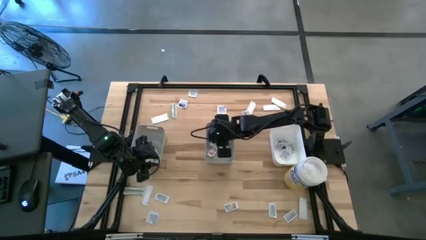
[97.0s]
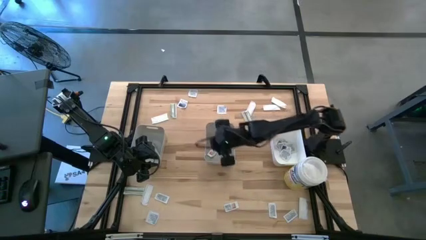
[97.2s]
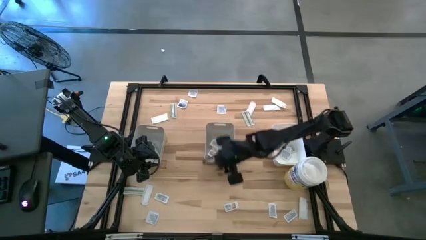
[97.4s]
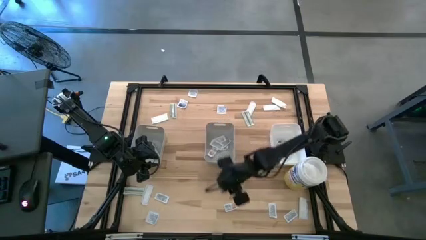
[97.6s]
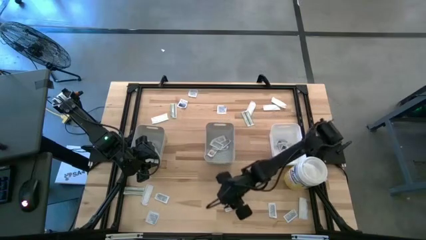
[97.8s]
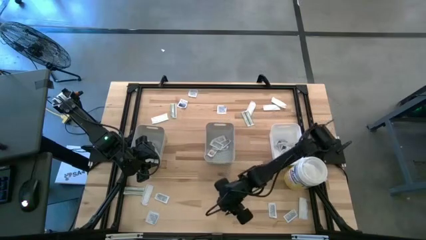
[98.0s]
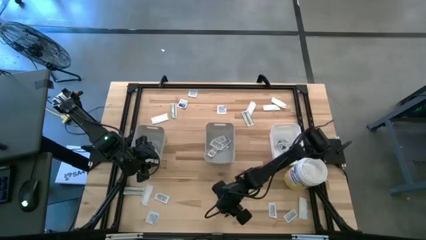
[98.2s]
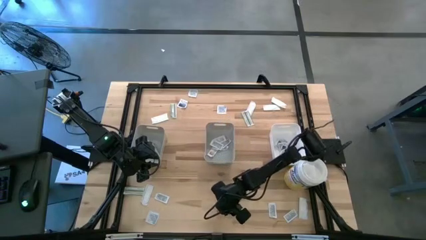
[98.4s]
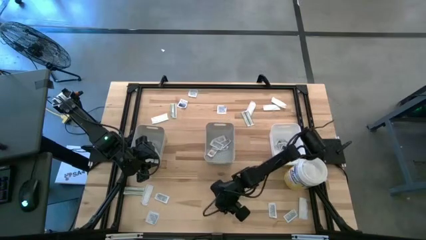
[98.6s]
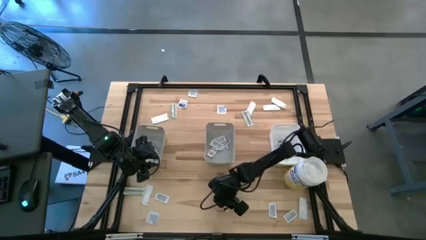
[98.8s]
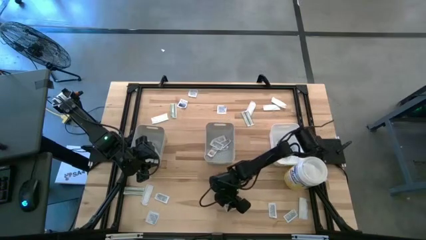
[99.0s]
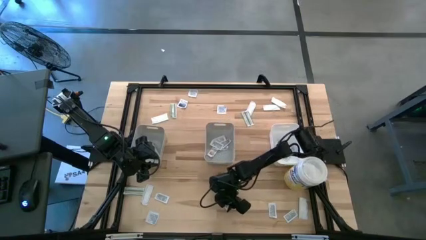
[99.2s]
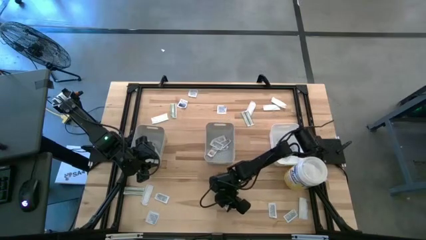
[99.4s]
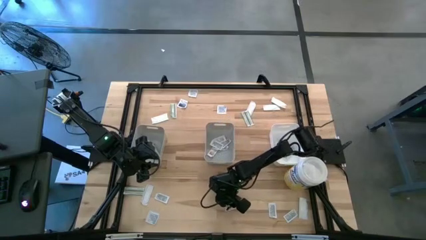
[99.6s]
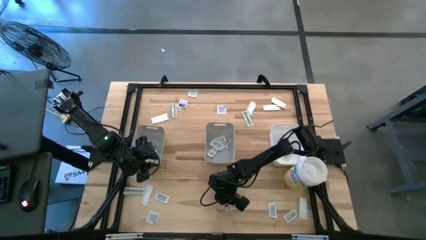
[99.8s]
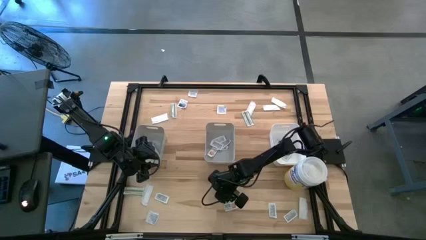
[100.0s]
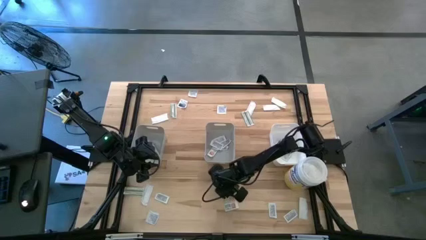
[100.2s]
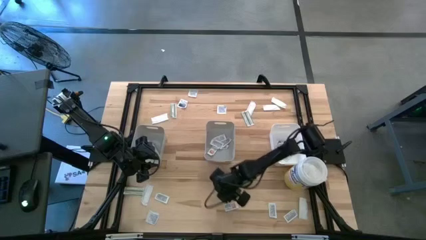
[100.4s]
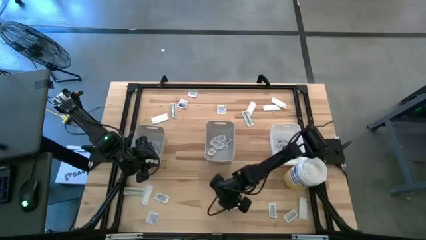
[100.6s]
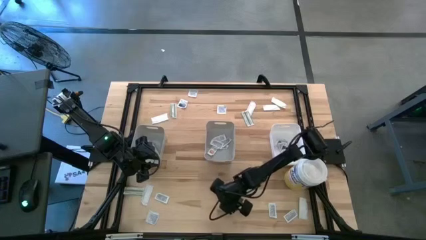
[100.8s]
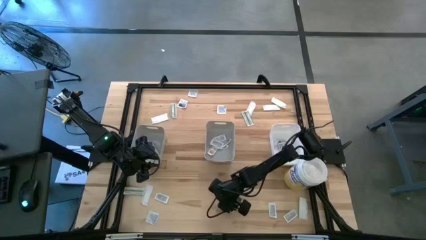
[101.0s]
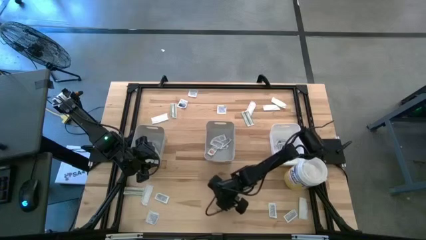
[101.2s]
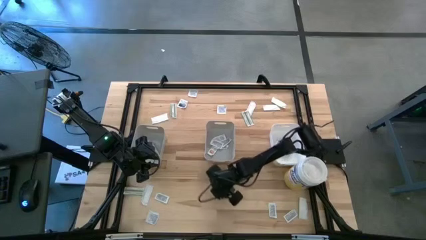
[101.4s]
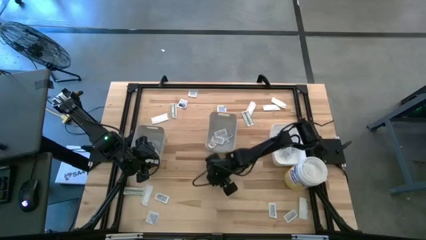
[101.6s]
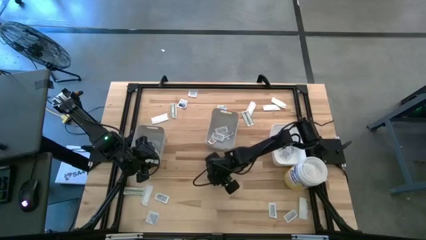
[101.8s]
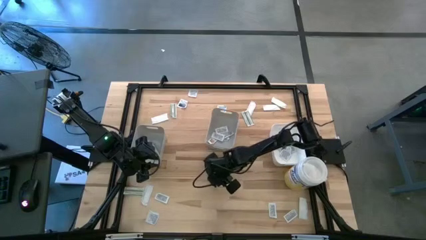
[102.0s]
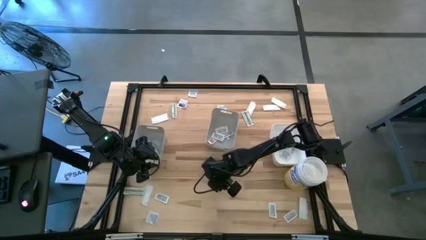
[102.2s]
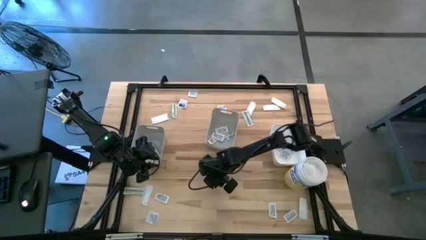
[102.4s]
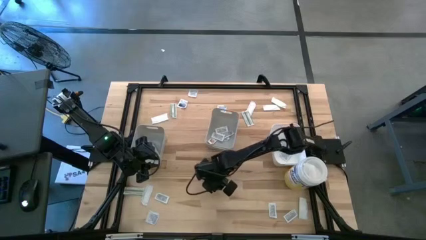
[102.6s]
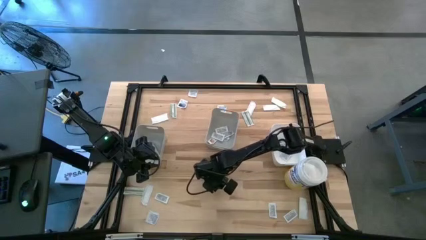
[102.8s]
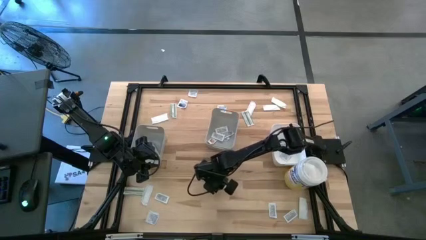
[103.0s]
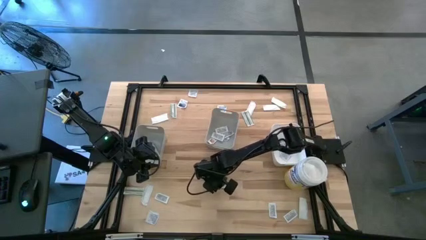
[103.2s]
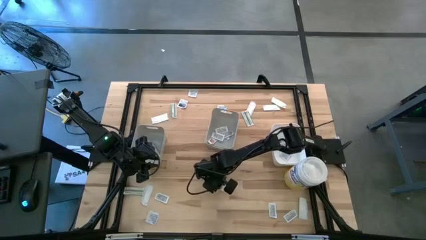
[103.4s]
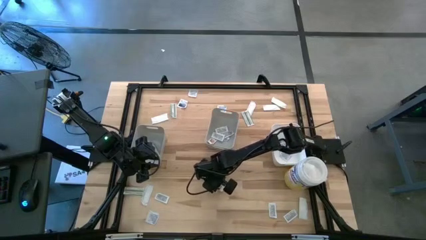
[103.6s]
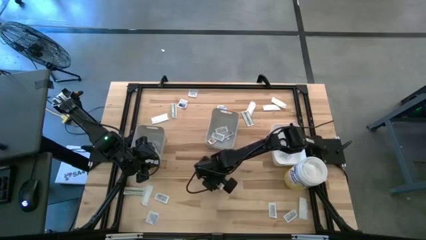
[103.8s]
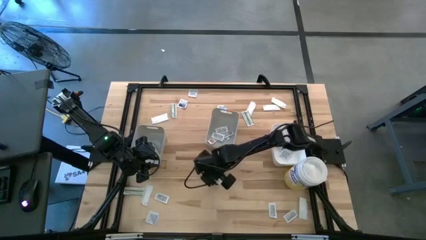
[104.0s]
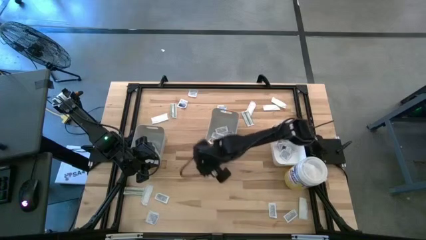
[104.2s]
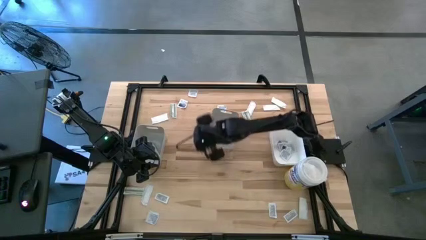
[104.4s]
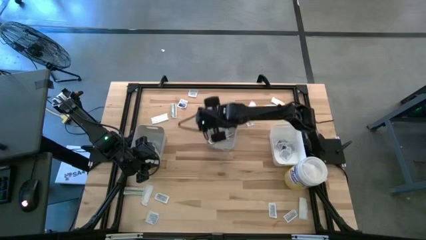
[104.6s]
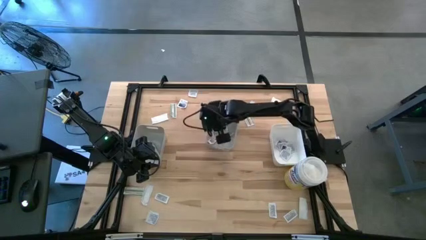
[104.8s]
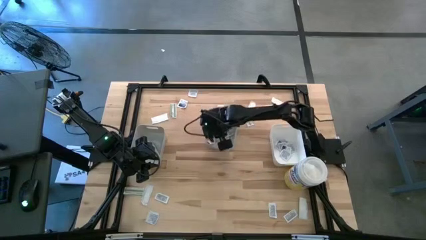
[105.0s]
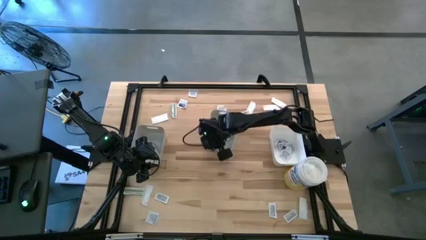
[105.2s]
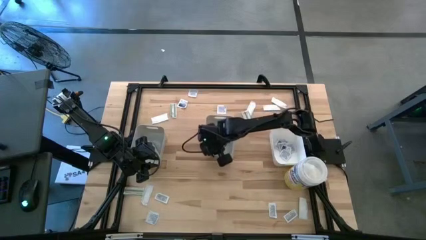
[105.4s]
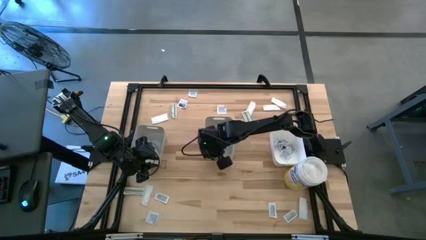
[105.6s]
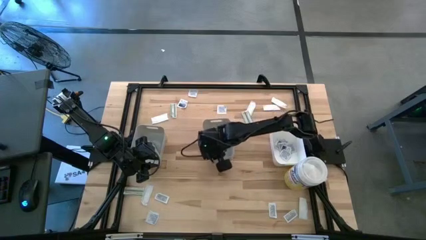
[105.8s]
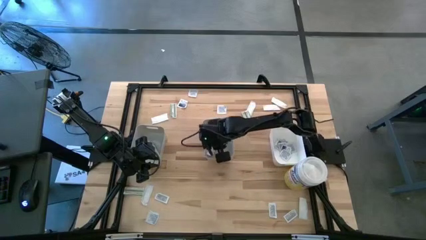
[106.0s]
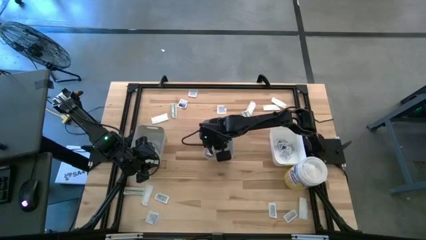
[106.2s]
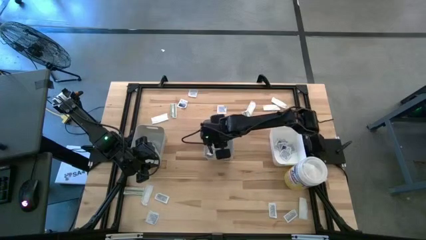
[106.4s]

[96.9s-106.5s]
Task: Pick & Place First Aid Supplies
Put the ointment pack into the right gray bin

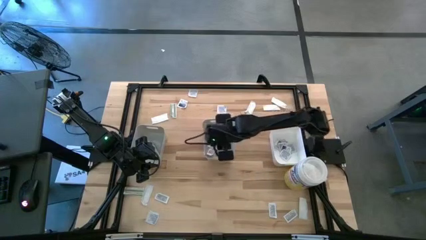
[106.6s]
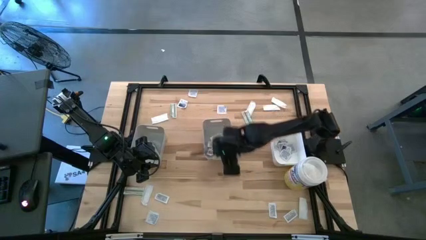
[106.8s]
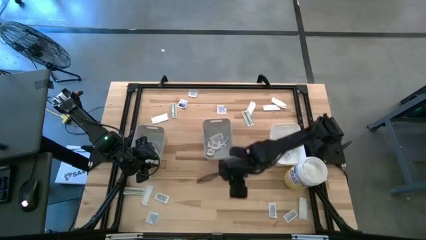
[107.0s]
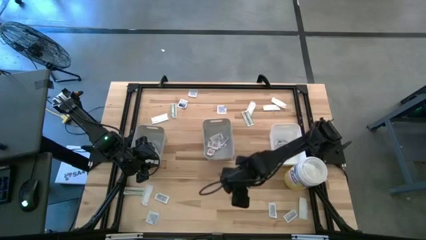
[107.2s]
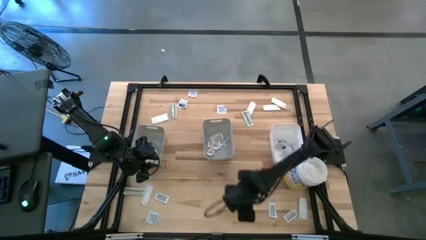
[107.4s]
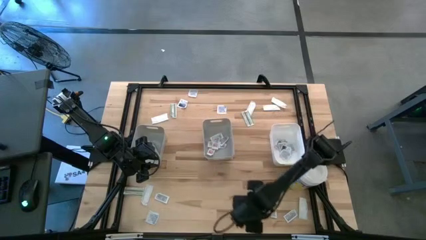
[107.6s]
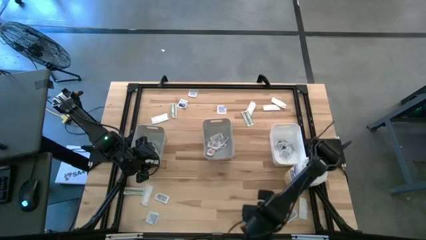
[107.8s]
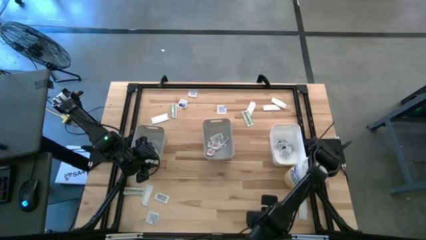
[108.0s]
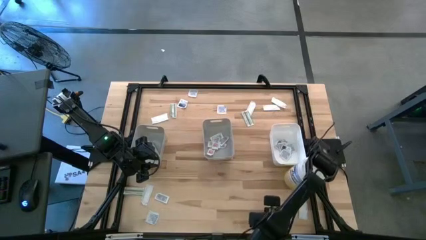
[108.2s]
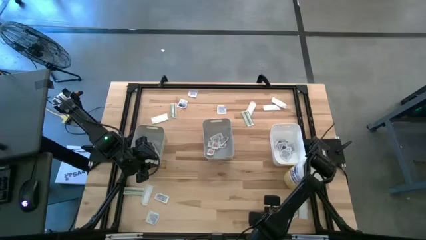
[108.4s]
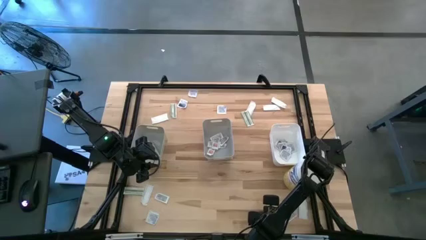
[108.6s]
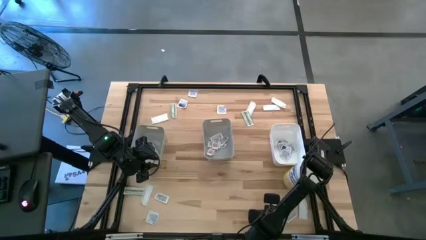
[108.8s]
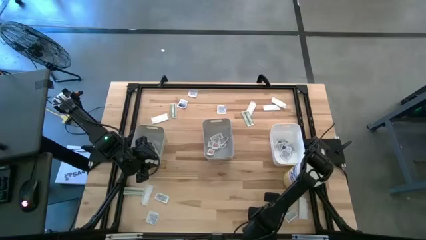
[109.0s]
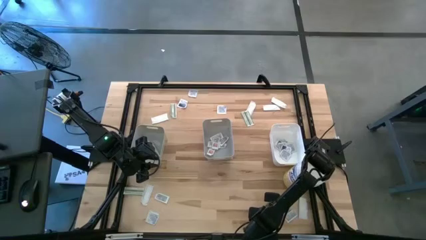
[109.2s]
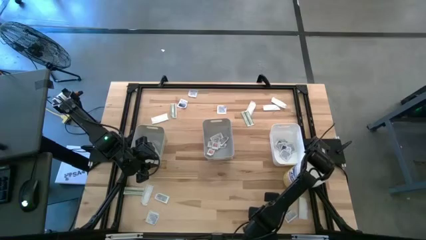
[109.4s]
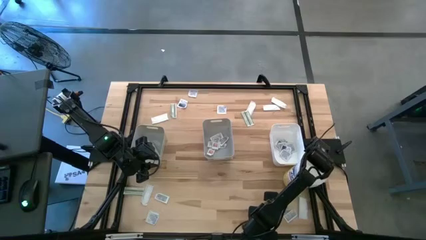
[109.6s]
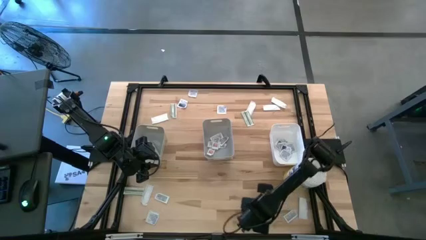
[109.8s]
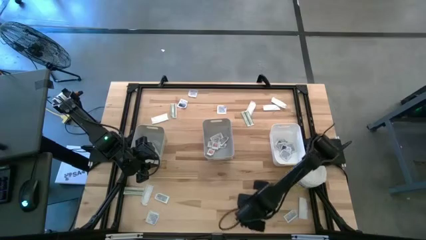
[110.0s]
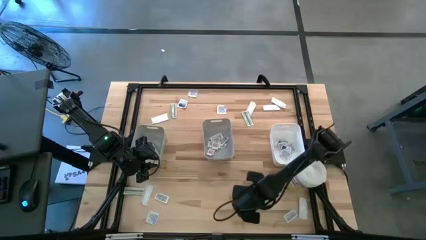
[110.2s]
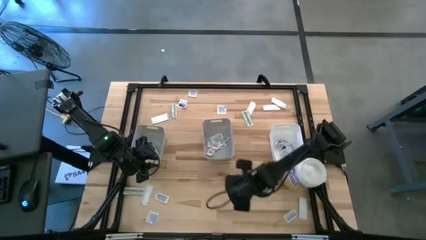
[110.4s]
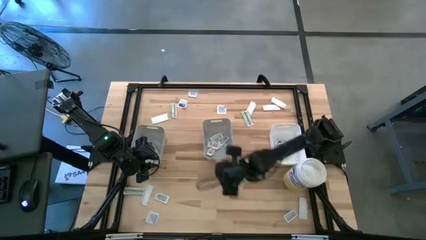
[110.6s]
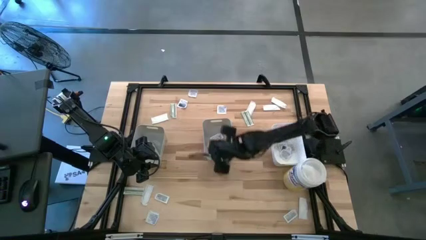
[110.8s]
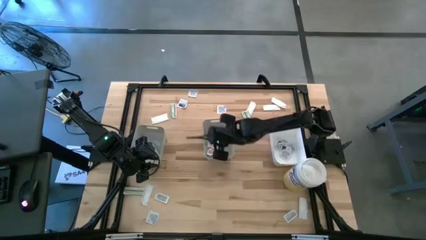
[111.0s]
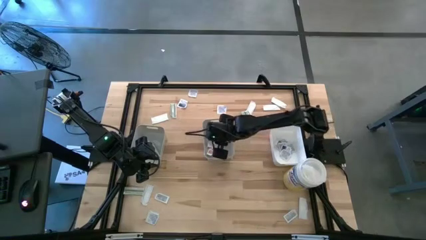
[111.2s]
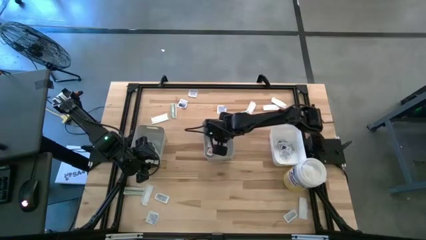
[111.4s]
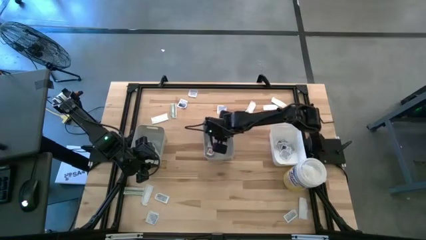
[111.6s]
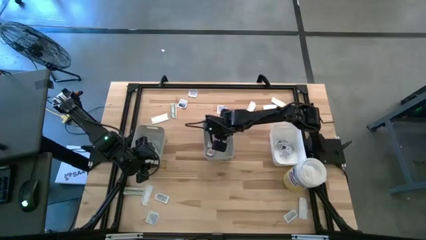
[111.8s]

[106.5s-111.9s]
Put the ointment pack into the right gray bin

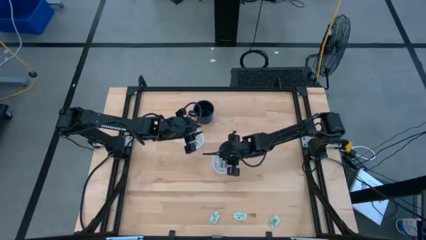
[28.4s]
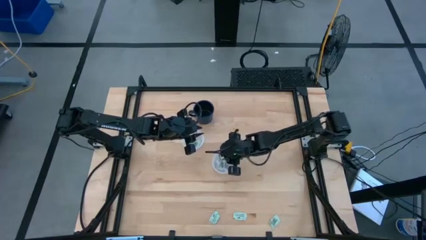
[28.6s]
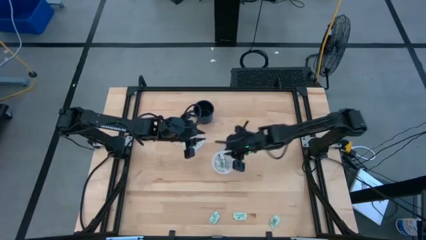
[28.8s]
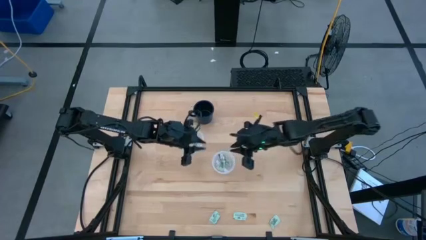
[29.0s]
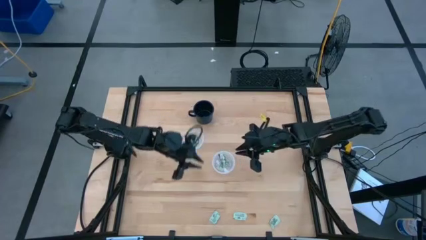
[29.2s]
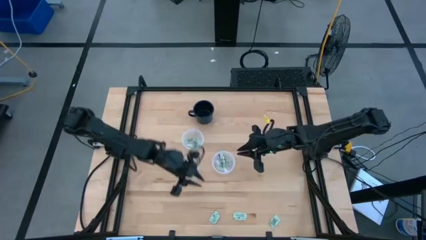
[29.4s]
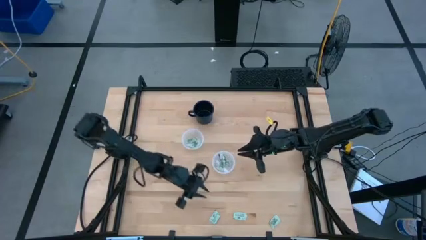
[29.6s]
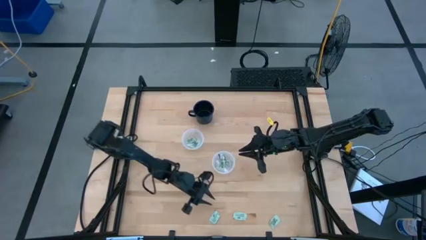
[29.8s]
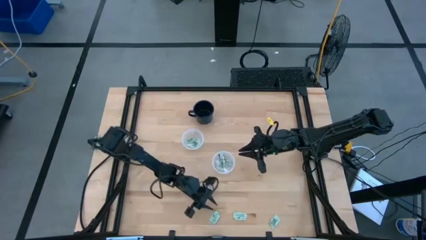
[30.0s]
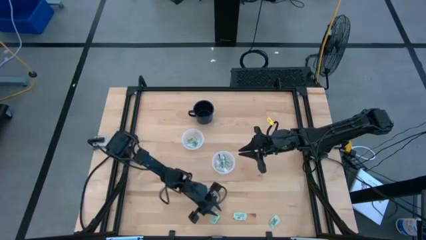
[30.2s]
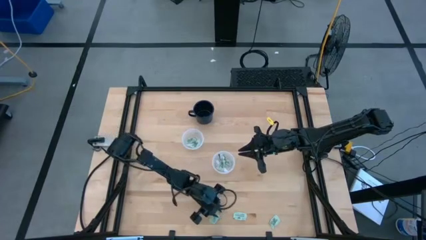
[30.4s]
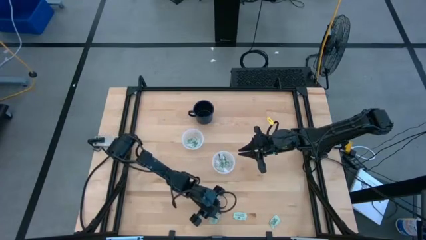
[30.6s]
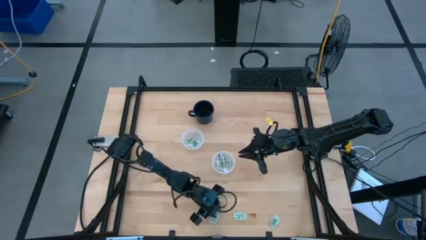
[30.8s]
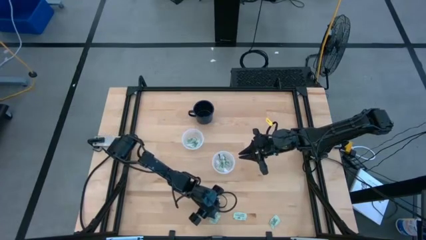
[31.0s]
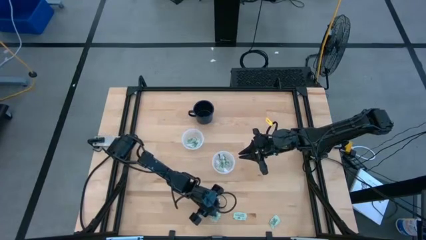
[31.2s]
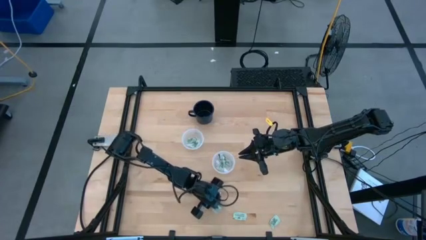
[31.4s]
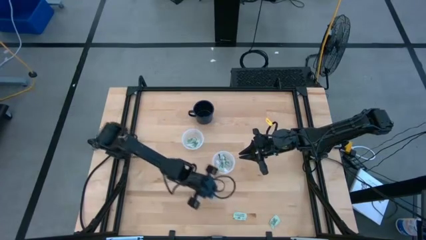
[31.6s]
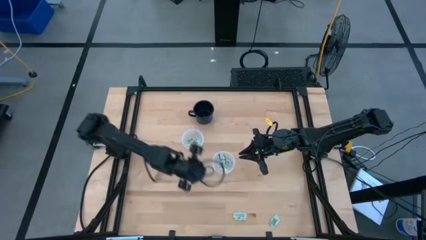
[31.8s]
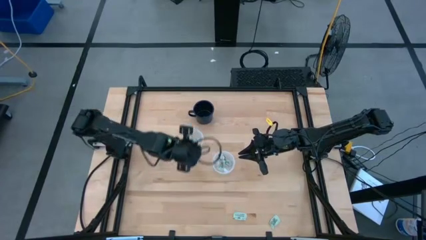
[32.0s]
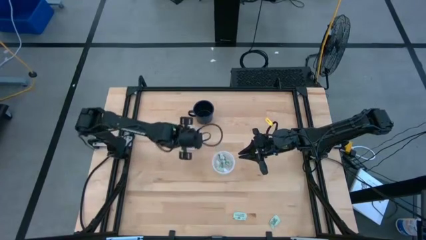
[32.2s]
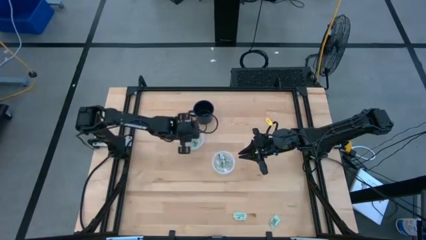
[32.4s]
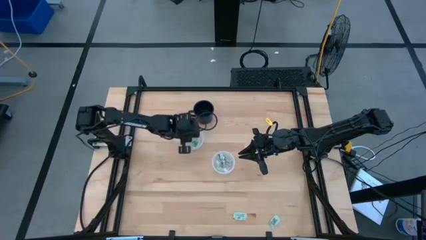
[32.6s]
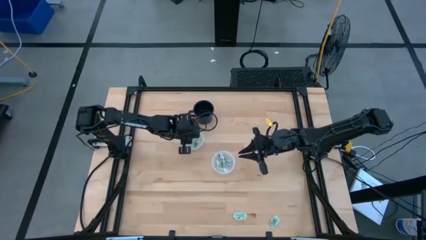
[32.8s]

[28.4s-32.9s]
Task: Pick and place Stevia / Truvia into bins
Put the stevia packet into the top round transparent container
